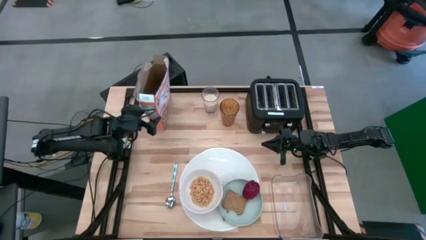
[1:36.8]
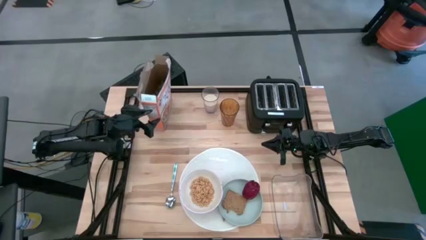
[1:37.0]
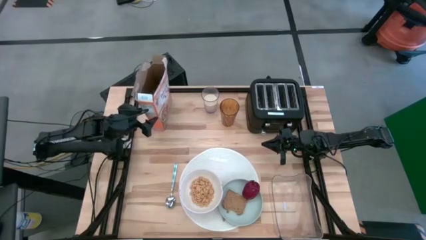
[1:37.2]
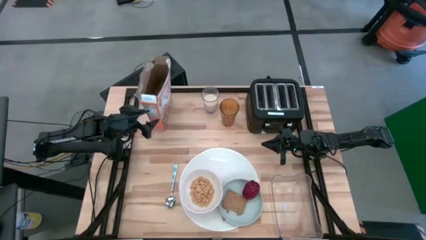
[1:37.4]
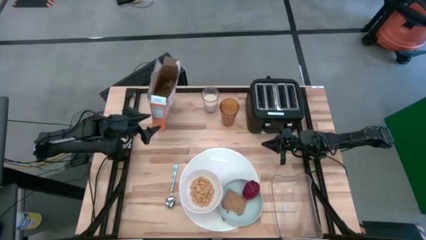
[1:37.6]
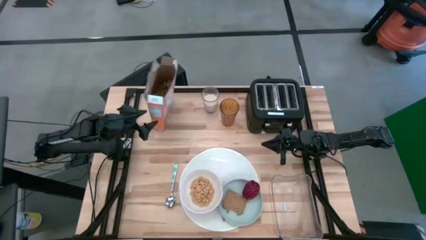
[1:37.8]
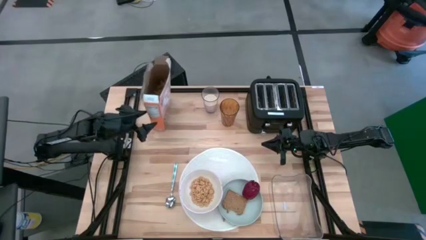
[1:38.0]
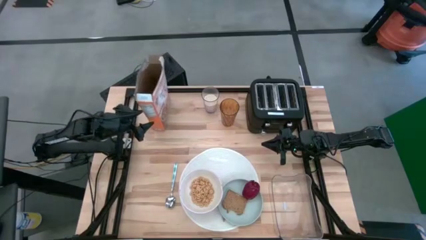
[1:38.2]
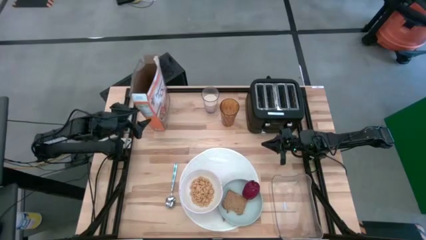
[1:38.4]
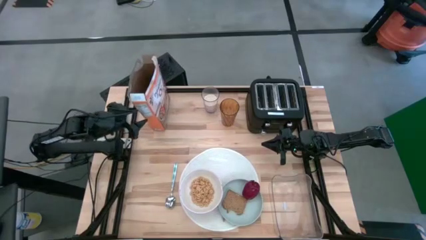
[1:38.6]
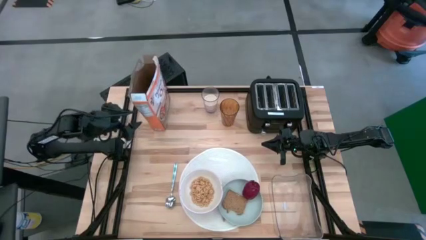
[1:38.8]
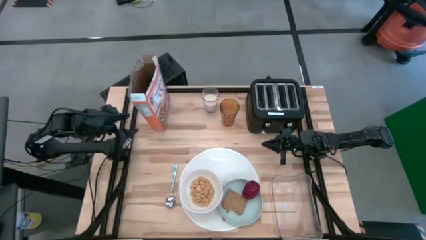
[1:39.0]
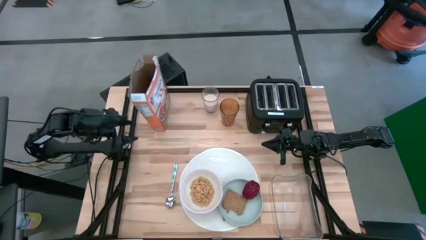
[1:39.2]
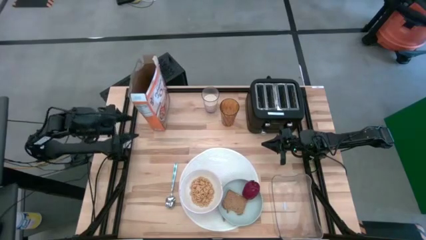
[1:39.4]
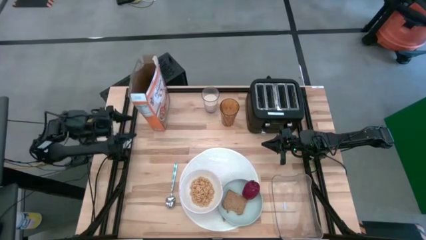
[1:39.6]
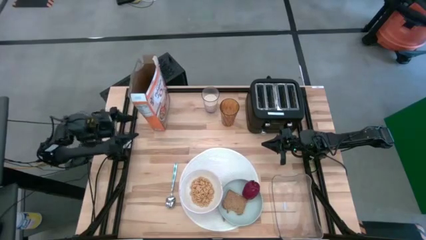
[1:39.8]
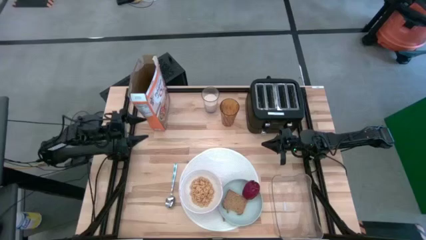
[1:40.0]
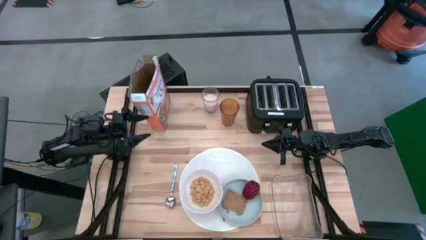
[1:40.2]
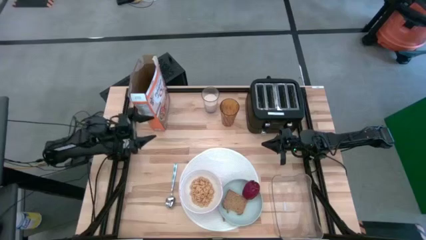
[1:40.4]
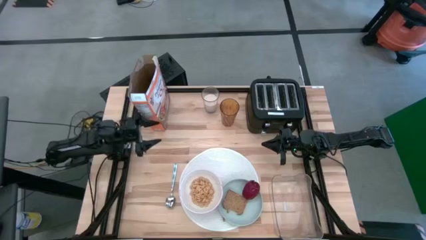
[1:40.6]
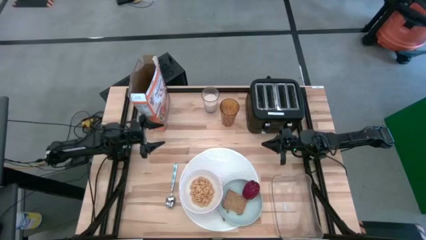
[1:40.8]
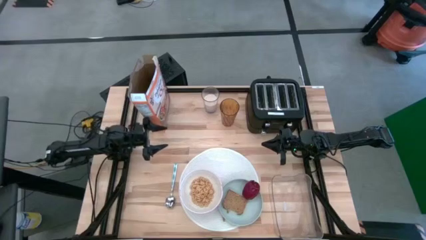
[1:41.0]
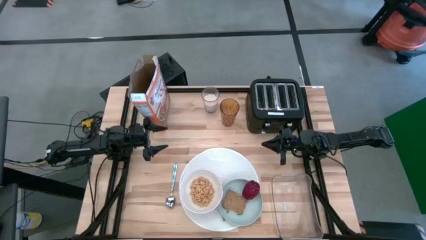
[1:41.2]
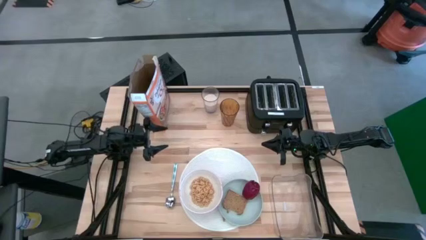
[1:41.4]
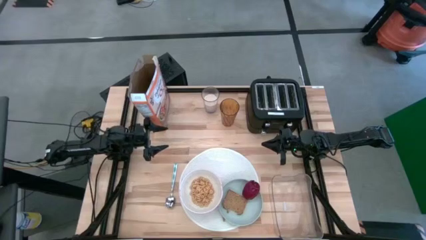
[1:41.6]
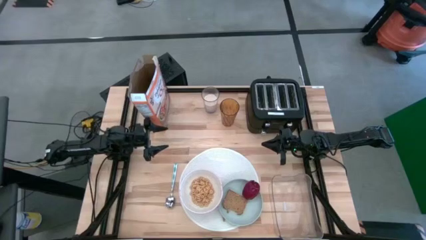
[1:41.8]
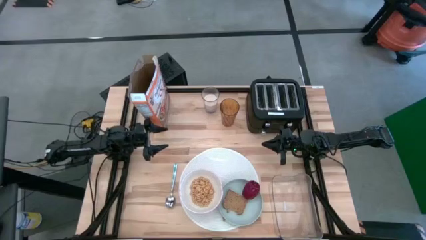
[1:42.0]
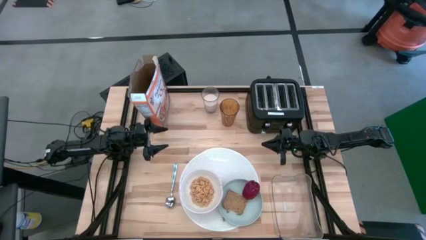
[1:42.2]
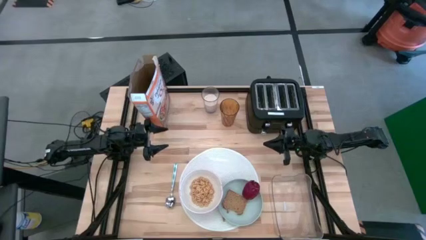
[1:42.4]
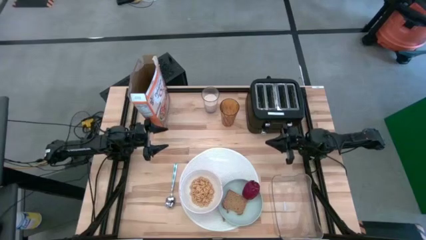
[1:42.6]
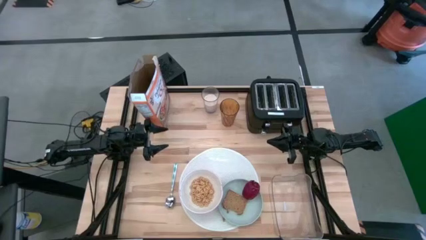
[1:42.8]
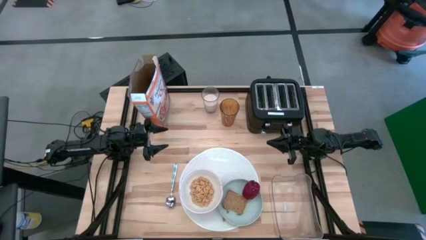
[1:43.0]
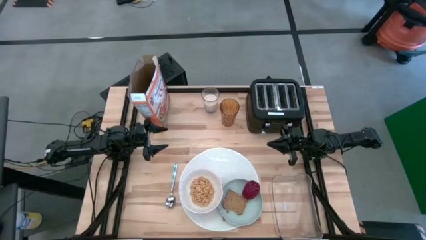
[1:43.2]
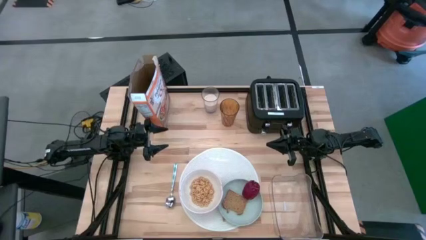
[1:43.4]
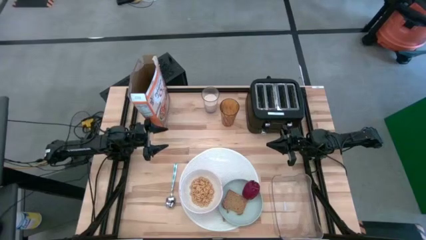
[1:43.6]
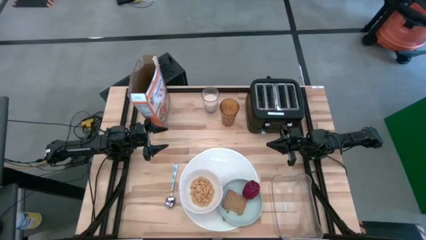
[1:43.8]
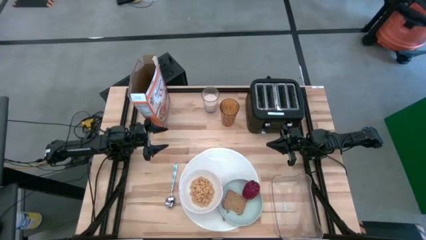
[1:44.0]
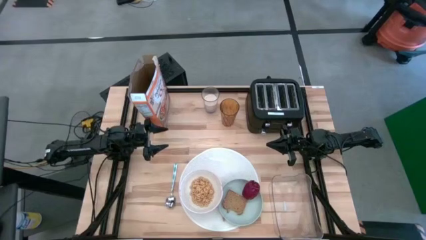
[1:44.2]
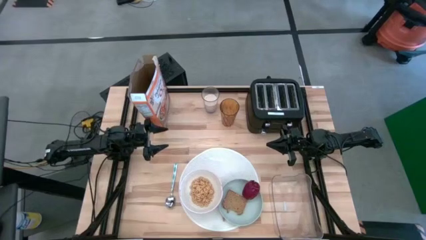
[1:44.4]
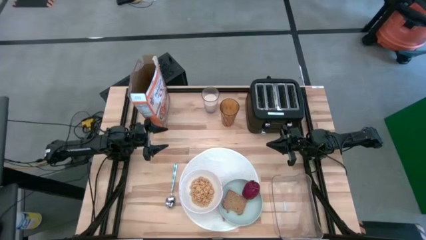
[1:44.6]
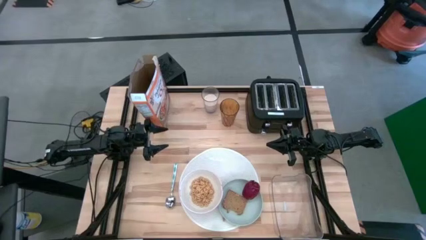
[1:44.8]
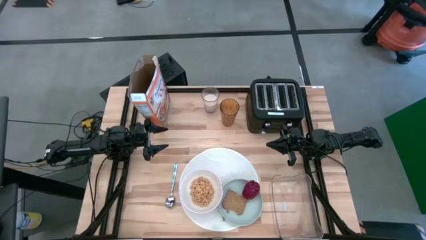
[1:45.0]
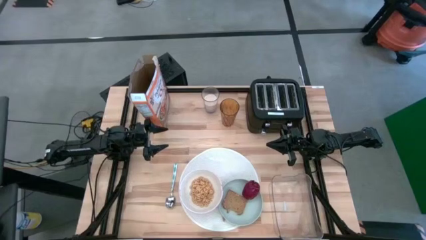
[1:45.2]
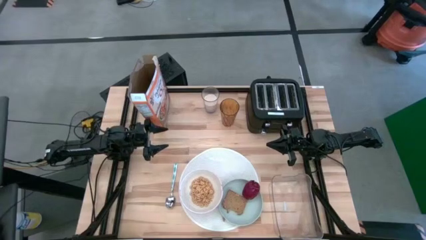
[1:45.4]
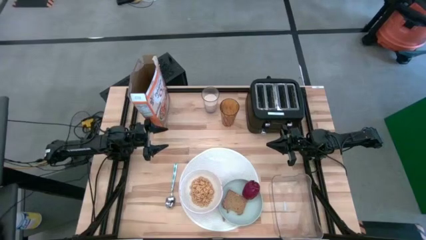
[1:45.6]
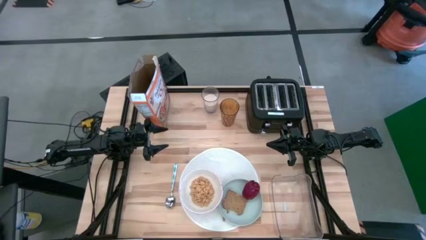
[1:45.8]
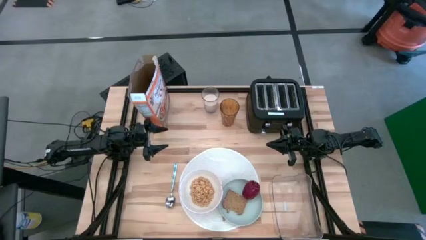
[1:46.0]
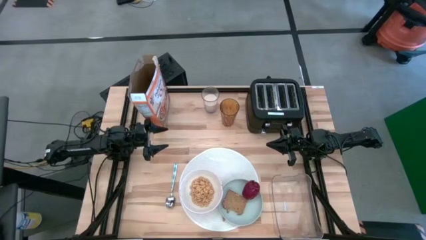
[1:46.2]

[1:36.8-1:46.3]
Task: Arrange a breakfast setting
Return to Home Position

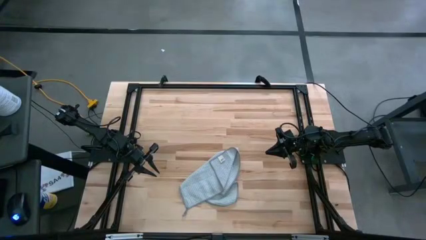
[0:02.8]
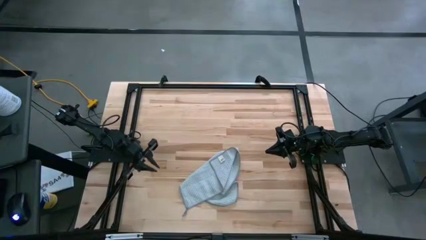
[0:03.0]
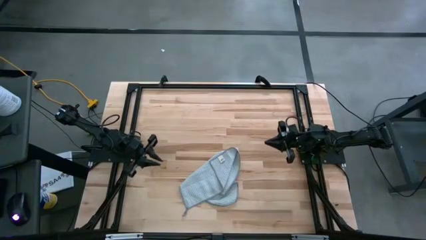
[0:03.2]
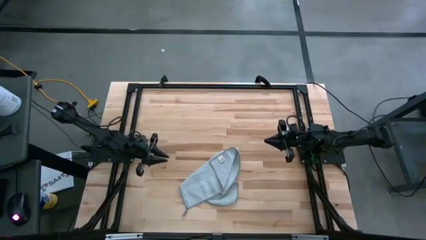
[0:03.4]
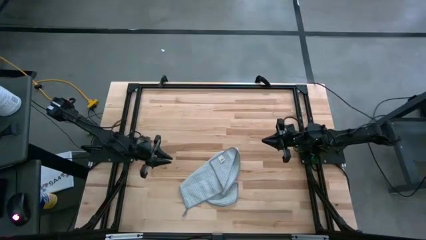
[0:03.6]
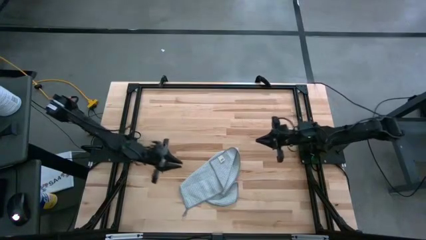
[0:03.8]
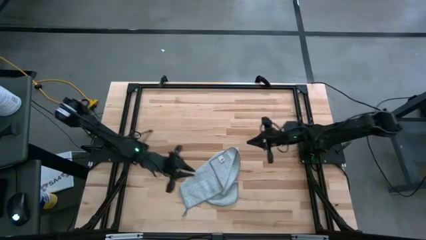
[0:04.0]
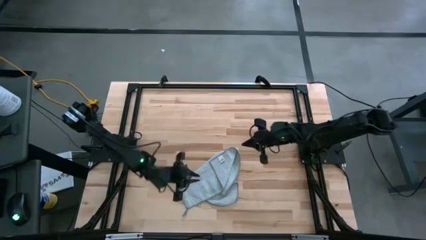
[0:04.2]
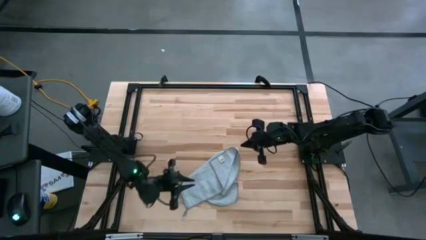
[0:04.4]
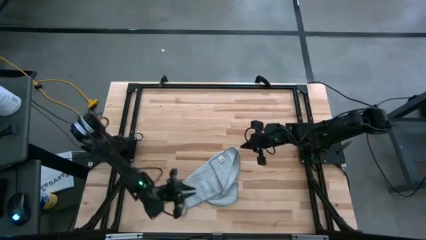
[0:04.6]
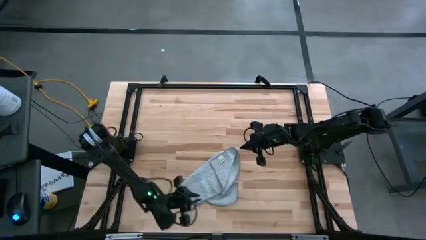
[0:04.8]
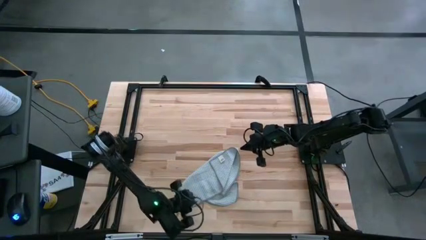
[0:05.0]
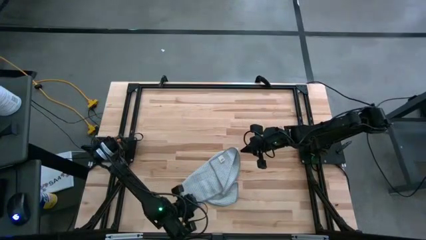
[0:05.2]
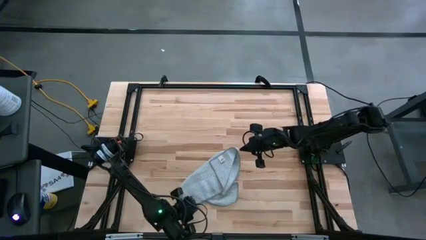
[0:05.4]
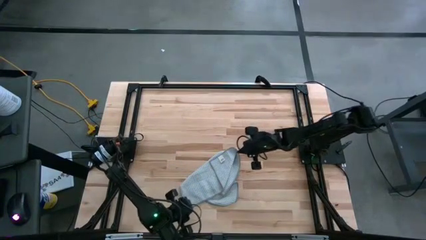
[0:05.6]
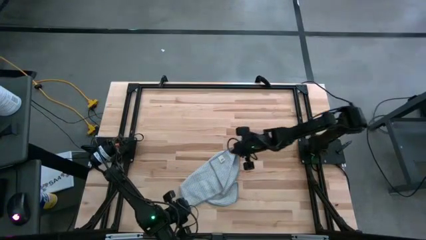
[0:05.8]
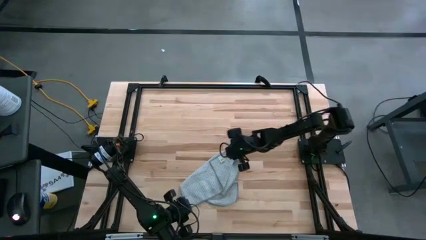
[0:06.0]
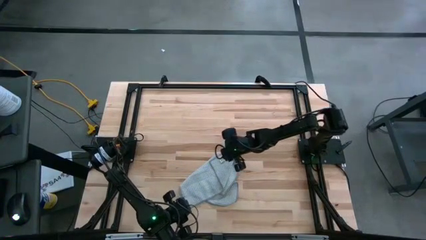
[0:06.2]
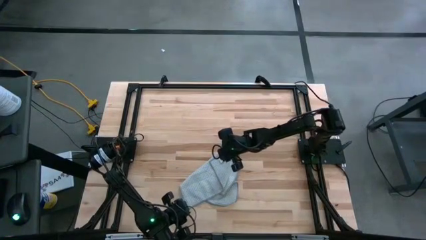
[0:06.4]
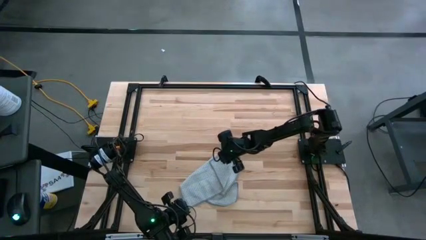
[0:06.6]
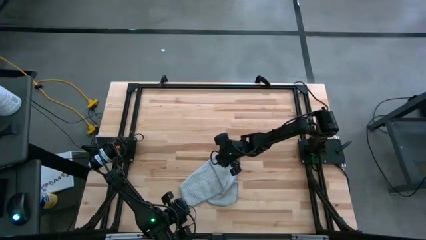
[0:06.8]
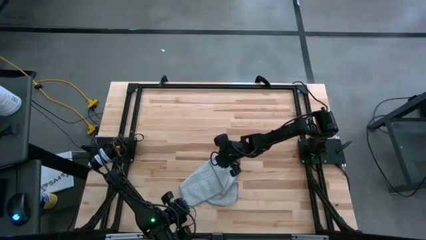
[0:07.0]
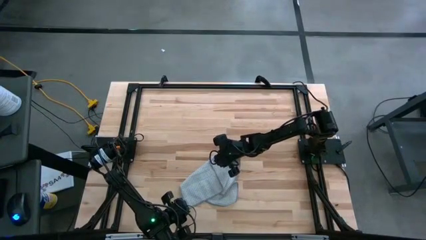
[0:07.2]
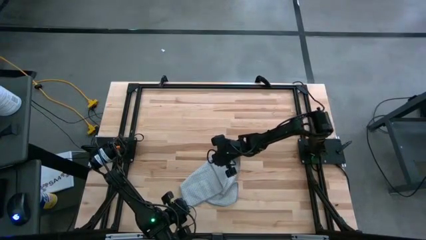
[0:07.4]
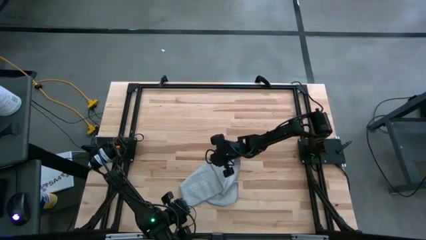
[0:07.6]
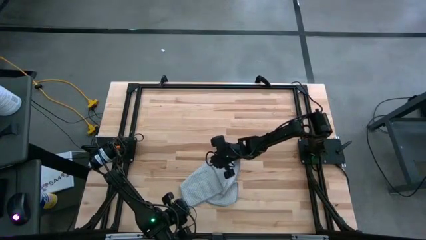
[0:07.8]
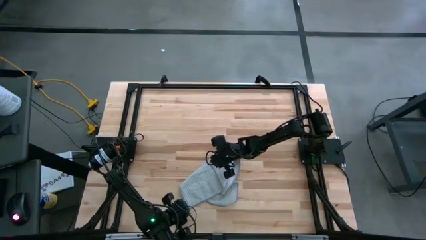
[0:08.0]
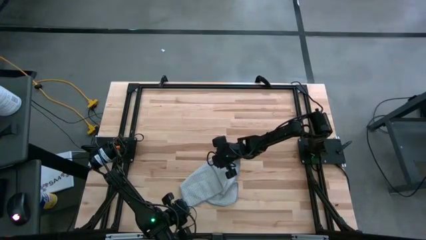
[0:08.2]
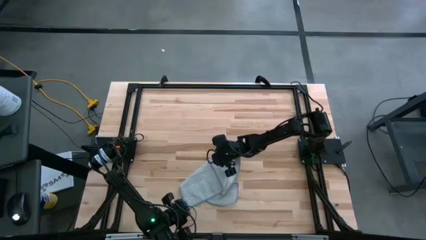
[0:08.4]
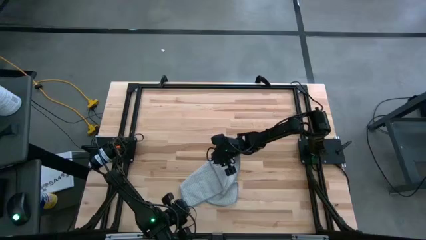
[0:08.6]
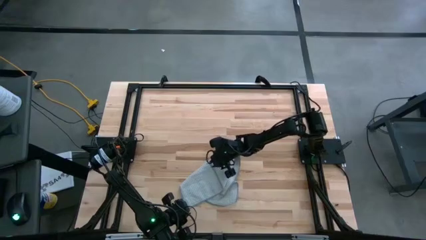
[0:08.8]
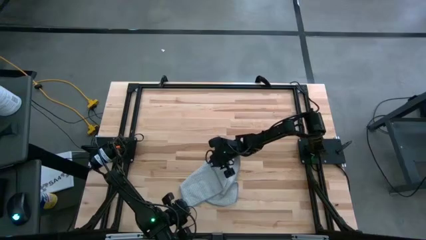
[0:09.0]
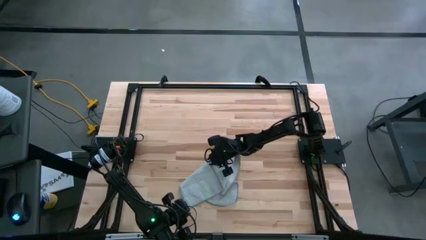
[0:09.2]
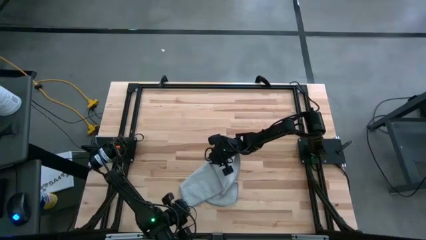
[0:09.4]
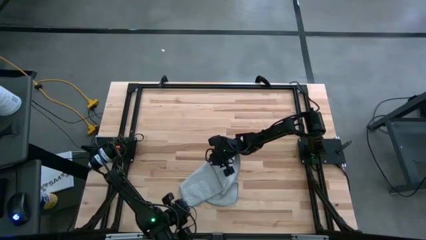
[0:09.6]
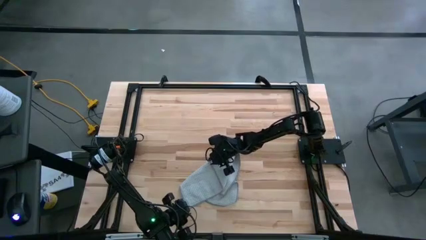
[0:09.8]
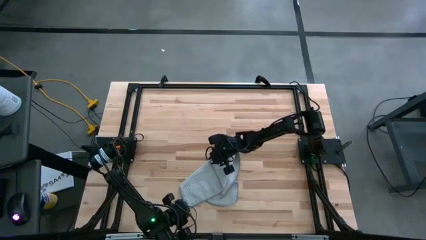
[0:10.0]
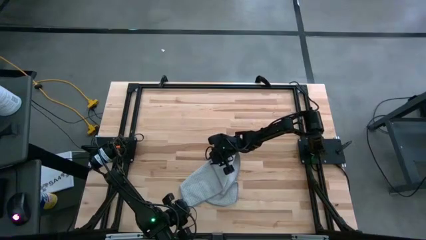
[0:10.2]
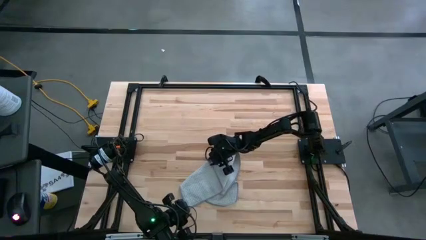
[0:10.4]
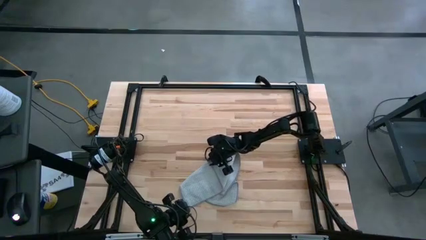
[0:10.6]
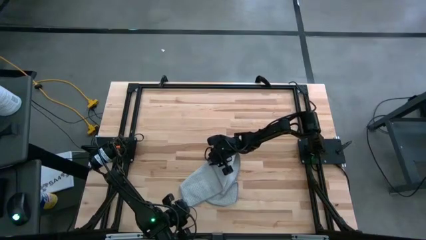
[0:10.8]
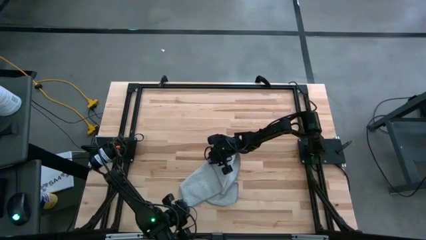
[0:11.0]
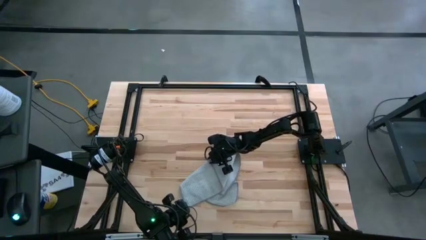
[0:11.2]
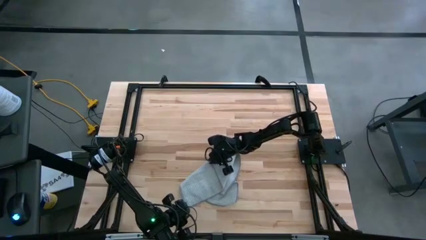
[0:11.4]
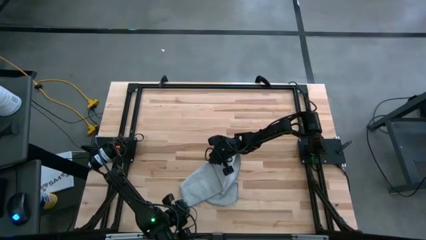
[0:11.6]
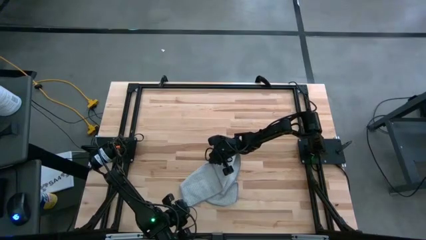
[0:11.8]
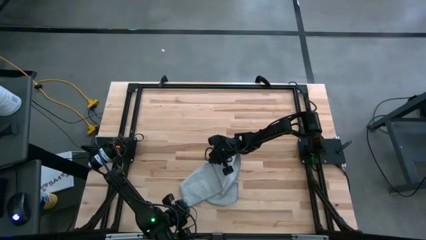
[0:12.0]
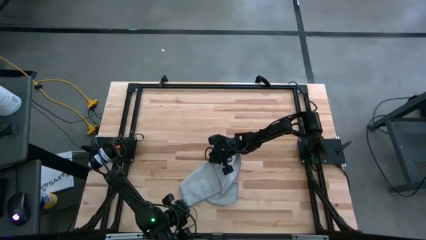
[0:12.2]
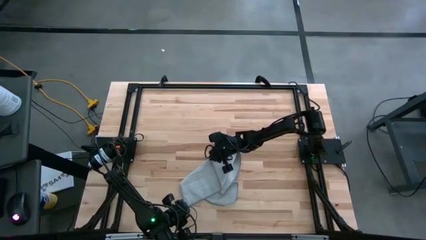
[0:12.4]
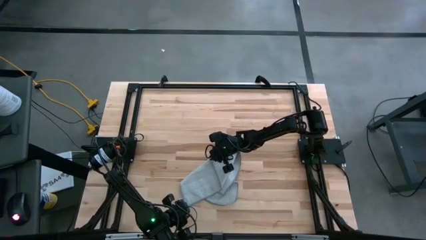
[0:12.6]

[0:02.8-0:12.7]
Task: Fold microfiber towels
Fold the gray towel on the table
